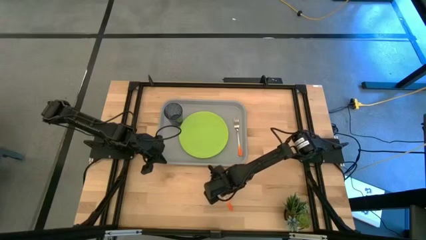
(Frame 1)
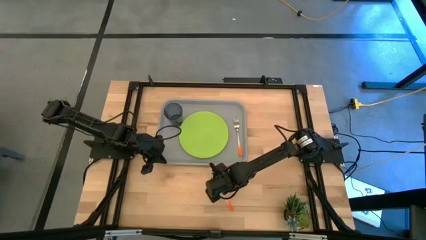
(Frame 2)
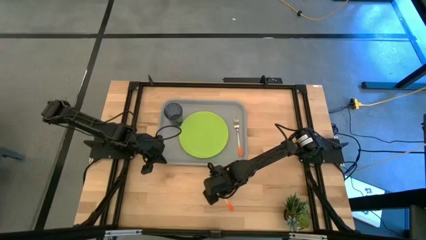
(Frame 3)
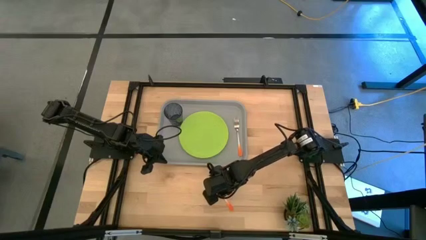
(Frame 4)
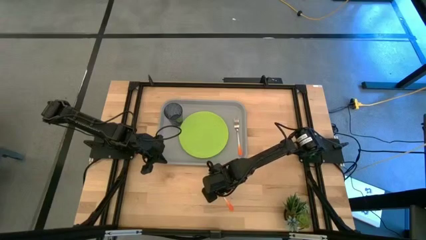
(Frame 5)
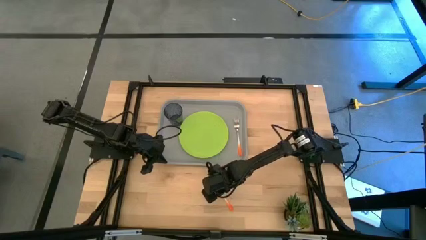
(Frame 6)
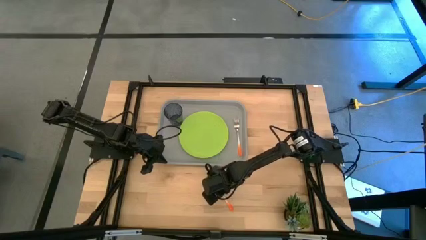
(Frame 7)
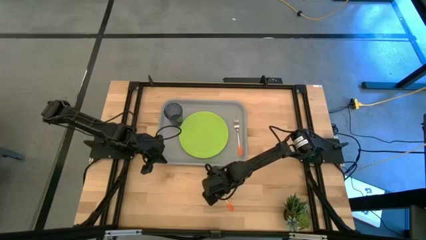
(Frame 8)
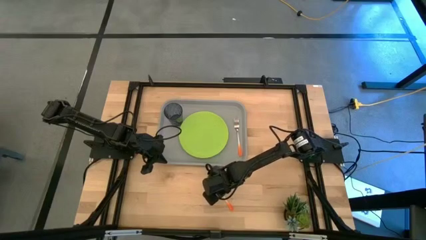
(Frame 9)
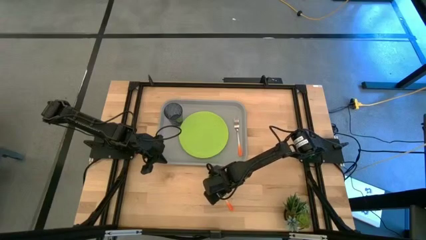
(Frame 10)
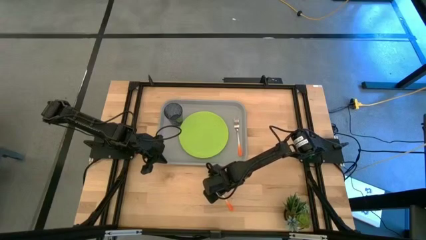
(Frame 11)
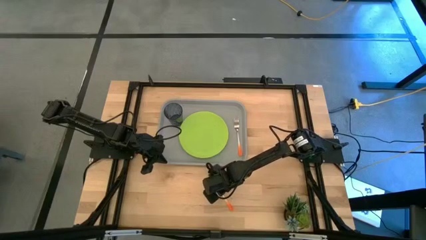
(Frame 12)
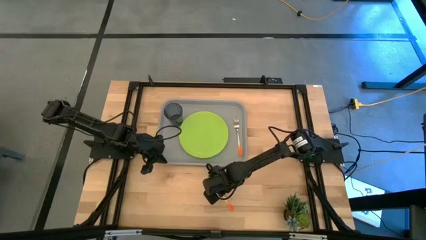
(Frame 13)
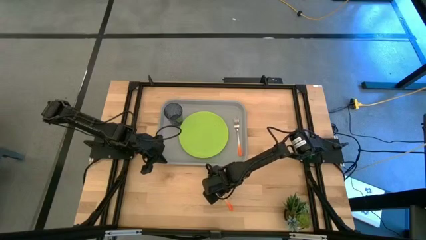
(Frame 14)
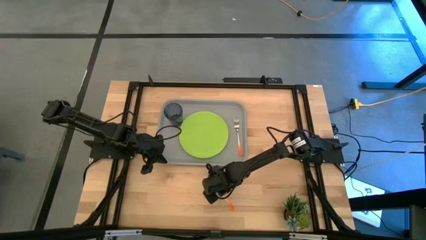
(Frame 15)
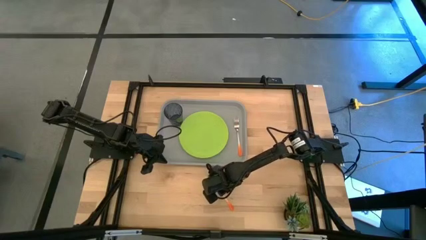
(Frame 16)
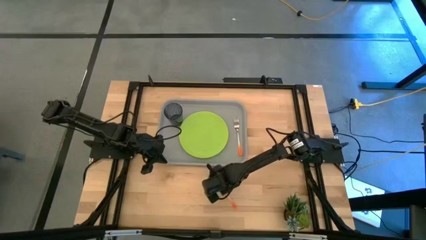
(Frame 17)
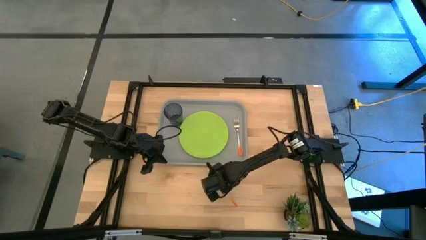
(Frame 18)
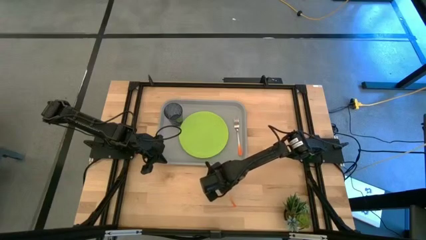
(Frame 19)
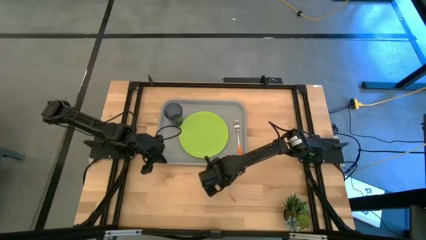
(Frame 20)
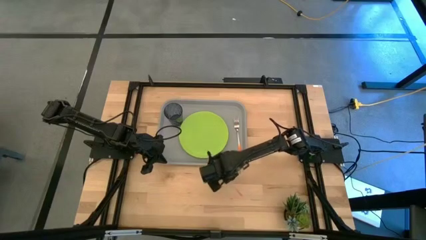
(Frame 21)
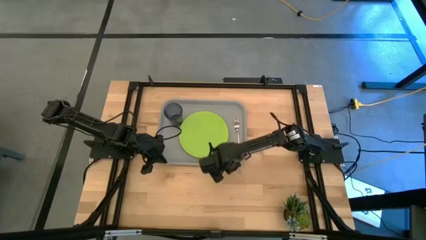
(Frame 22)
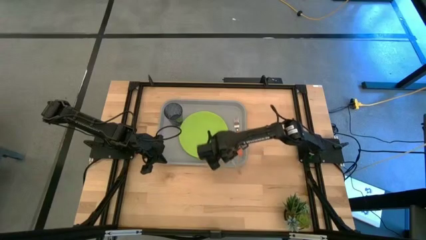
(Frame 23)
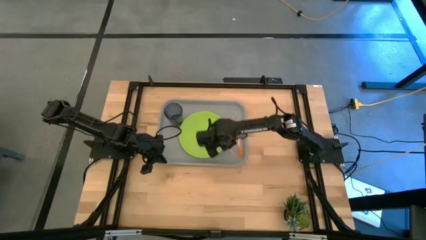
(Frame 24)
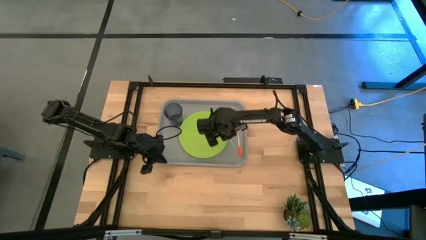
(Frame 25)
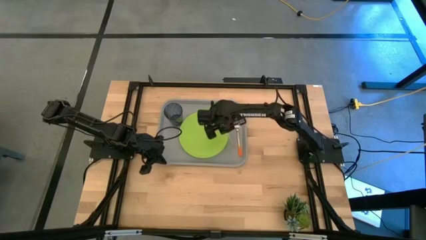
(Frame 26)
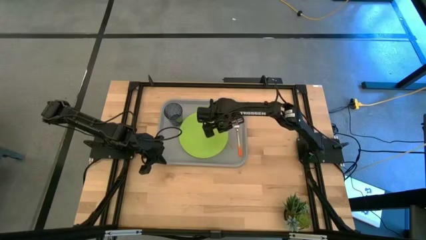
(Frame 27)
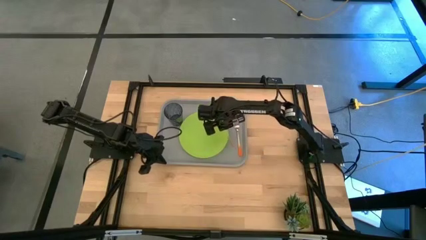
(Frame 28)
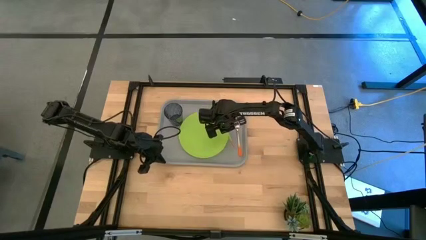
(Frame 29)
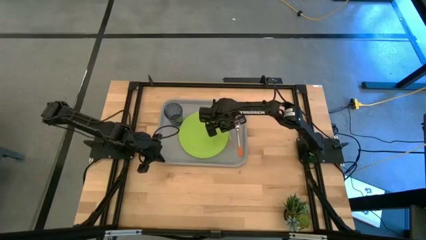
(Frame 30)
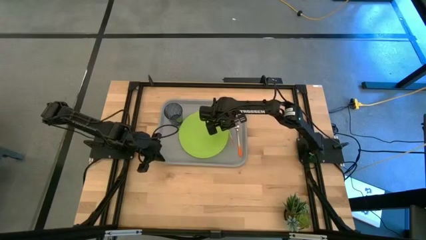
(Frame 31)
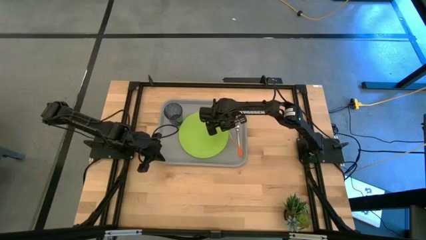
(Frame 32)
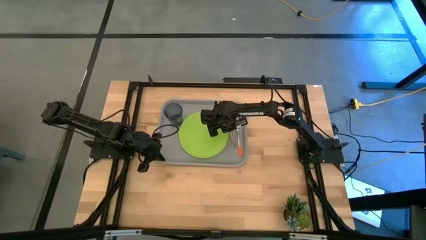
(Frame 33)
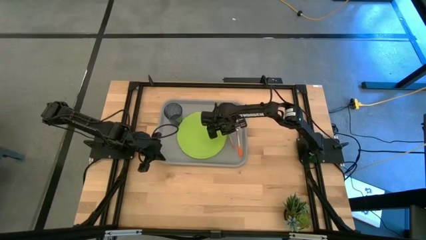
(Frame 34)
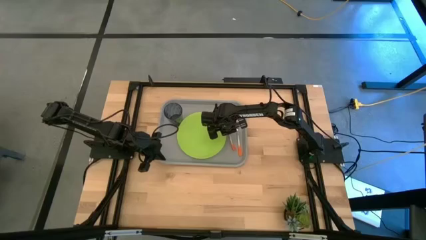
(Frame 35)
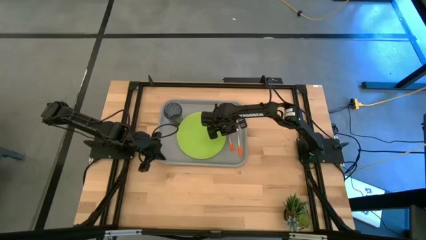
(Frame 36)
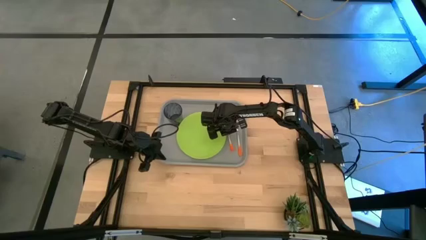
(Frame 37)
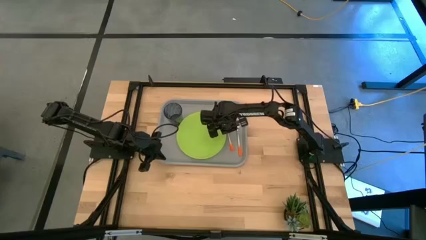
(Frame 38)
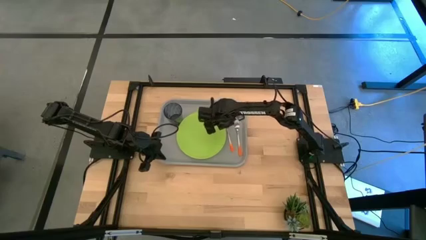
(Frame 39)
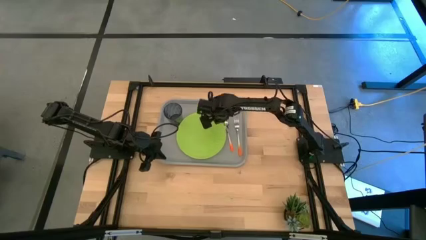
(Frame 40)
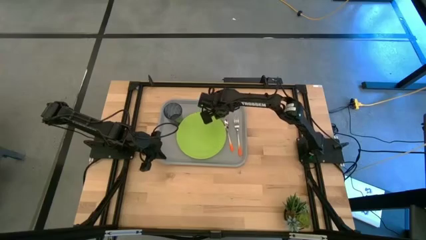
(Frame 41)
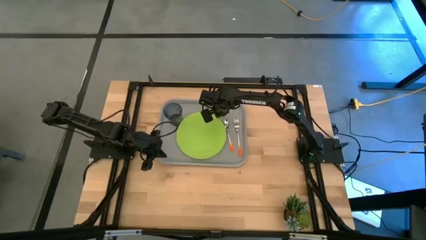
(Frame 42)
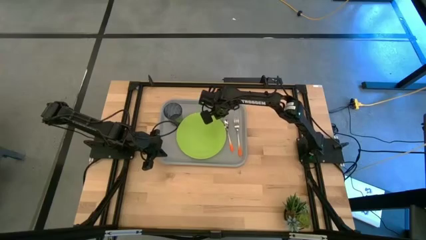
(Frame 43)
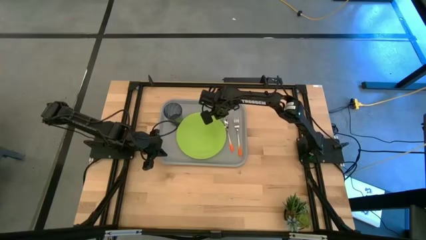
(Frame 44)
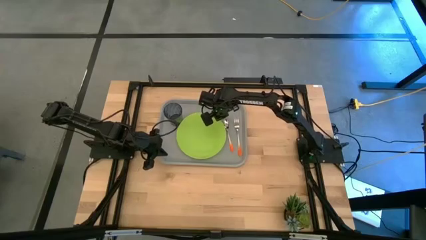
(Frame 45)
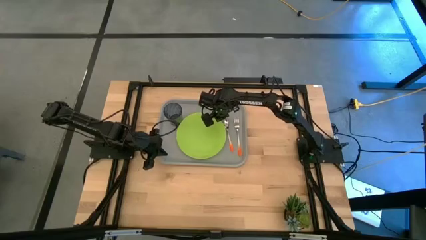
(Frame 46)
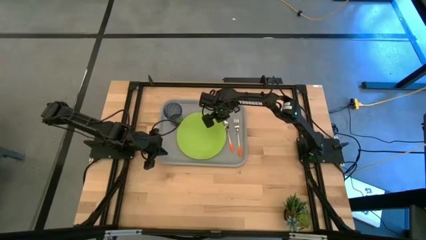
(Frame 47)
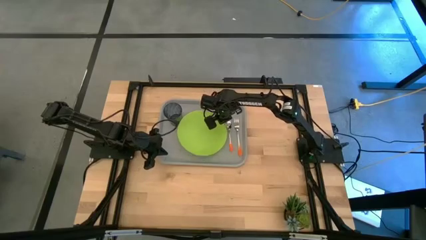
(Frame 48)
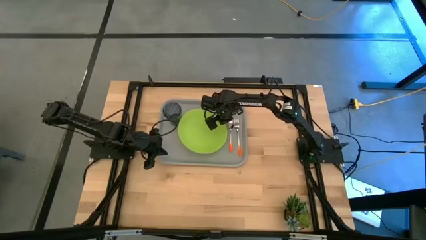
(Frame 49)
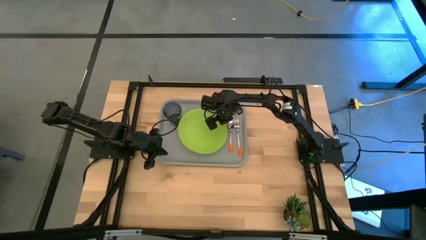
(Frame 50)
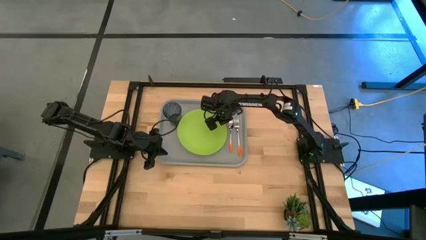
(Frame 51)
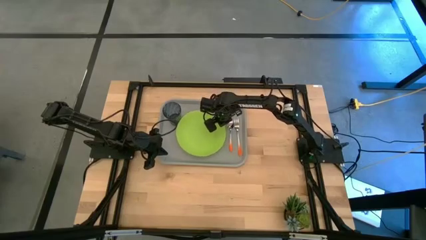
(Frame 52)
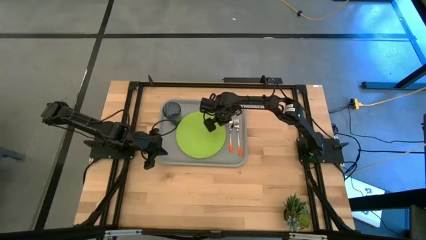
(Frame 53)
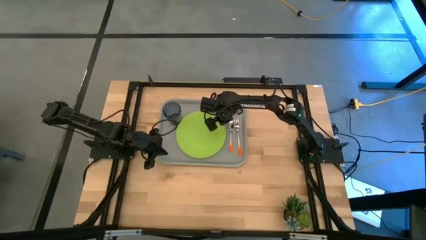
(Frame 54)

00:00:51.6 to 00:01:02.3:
Task: Pick and place plate/cup/fork/spoon on tray
Put the orange spoon on the gray tray in between the green plate and the orange fork

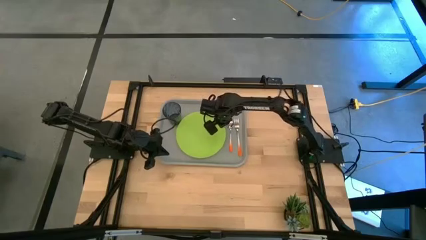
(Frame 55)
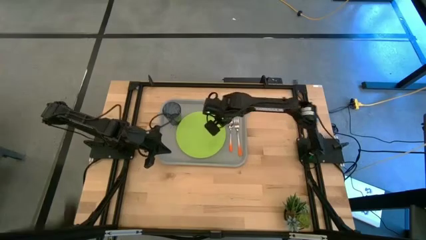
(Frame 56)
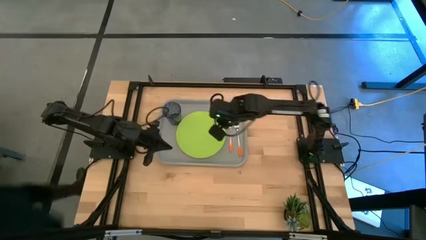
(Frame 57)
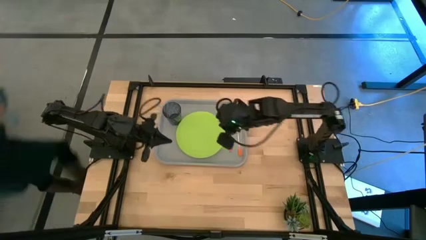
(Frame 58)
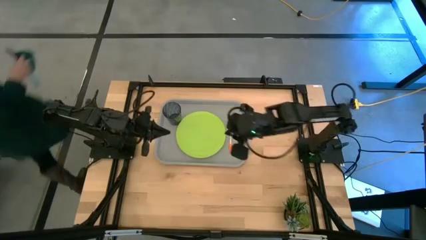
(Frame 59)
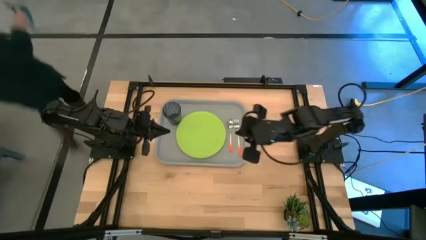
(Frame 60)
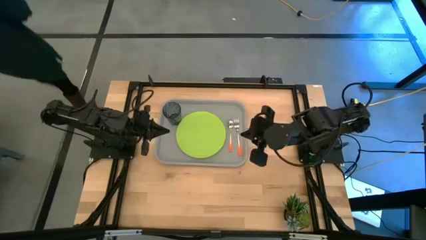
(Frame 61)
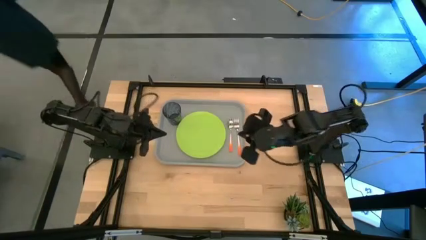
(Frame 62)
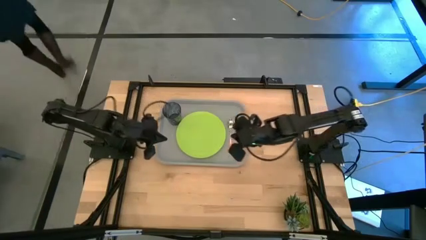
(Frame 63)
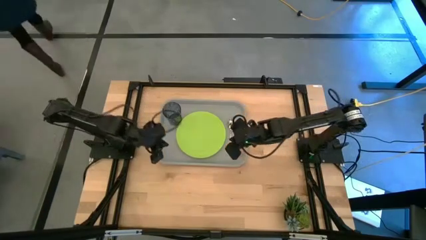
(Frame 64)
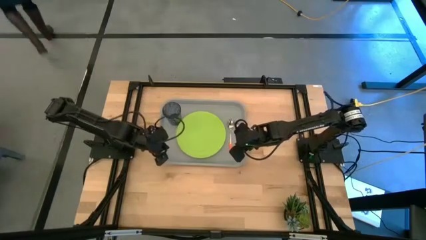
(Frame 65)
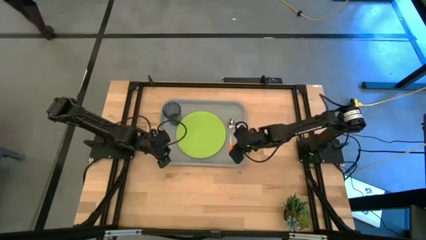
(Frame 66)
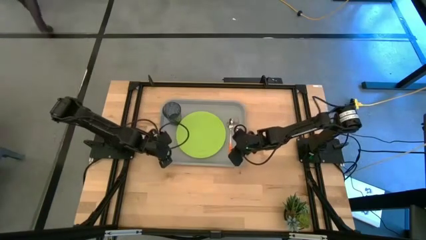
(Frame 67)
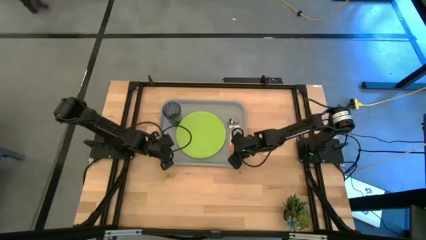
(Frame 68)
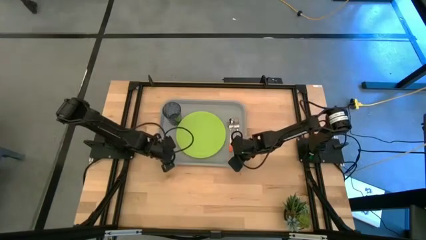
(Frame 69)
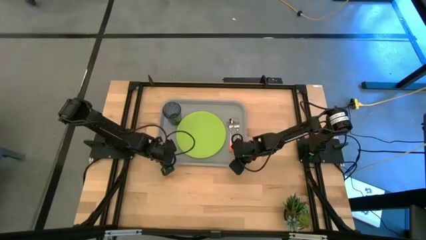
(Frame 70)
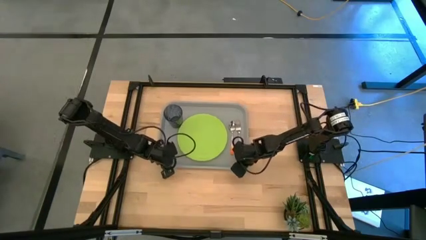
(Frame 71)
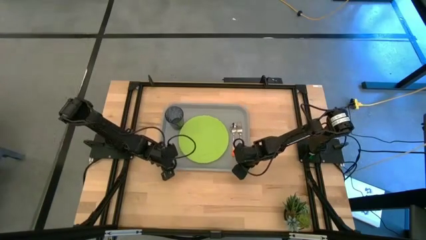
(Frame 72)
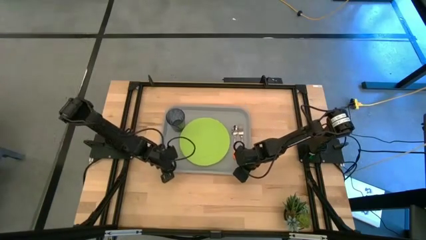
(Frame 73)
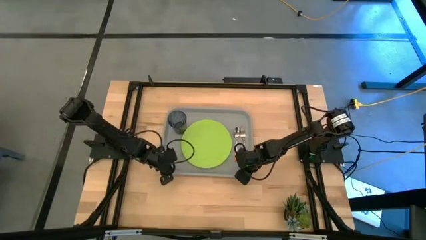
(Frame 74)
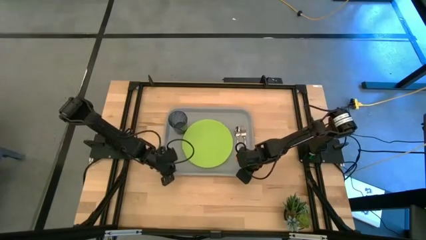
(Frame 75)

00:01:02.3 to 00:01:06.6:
Adjust the gray serving tray
